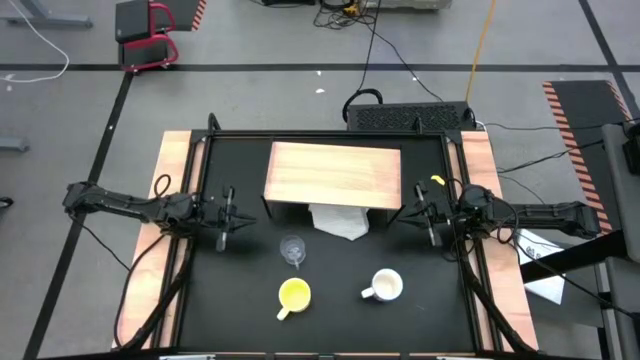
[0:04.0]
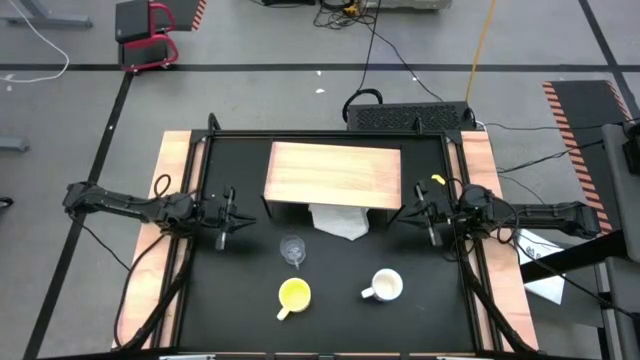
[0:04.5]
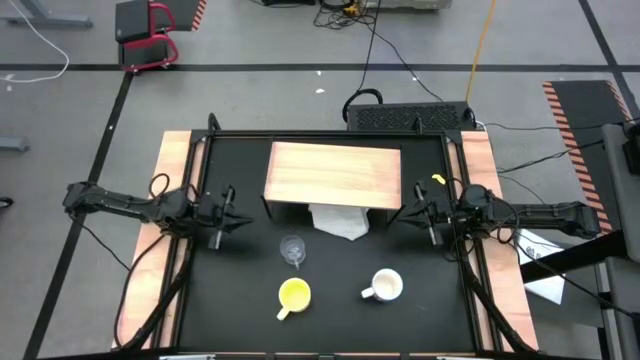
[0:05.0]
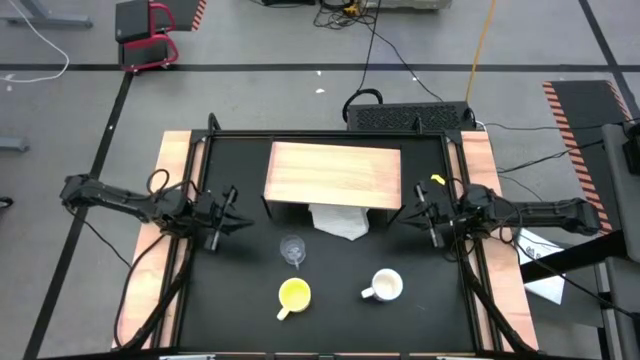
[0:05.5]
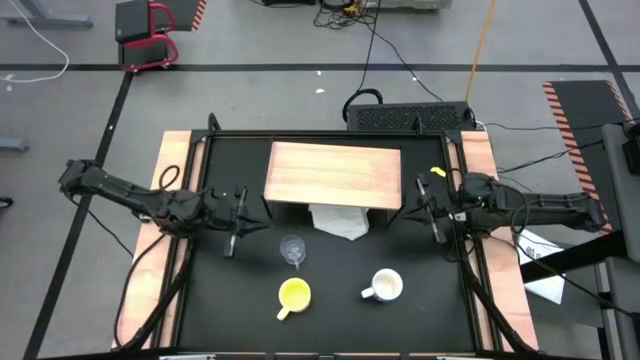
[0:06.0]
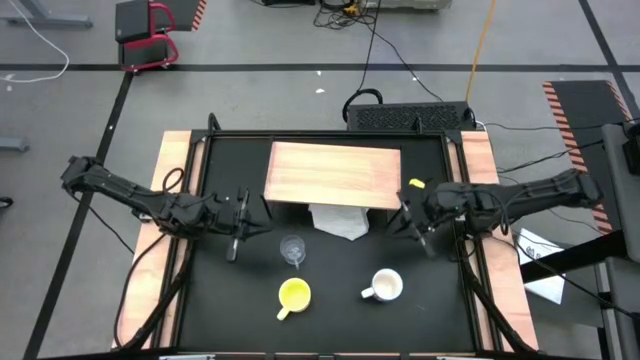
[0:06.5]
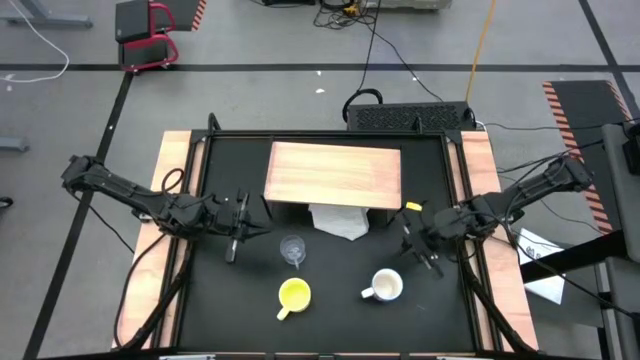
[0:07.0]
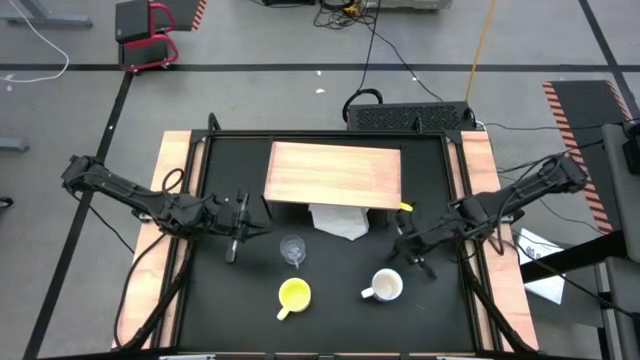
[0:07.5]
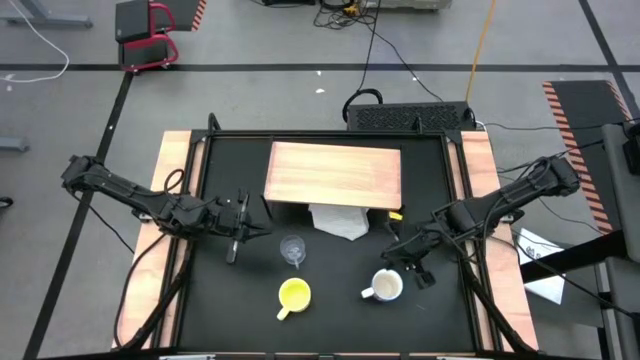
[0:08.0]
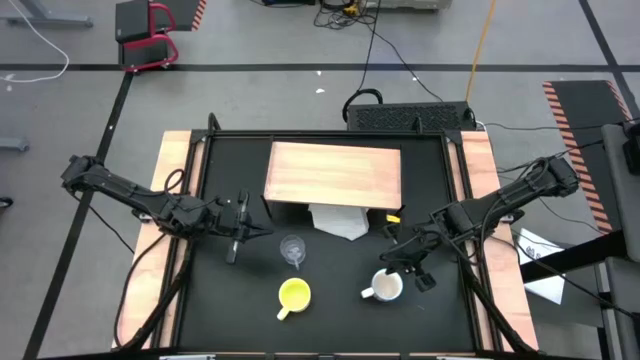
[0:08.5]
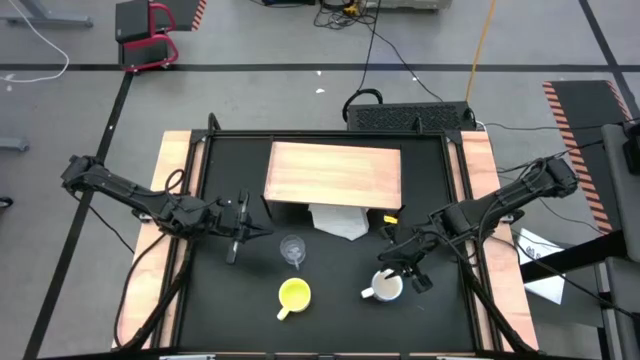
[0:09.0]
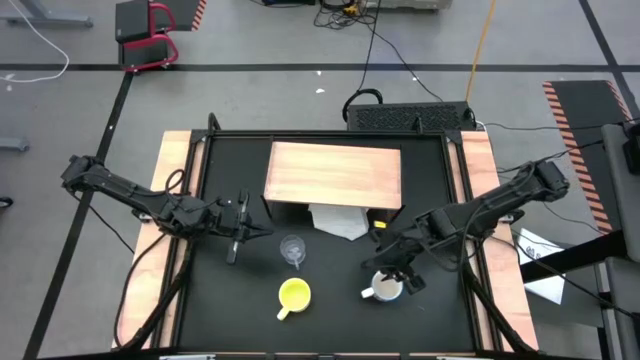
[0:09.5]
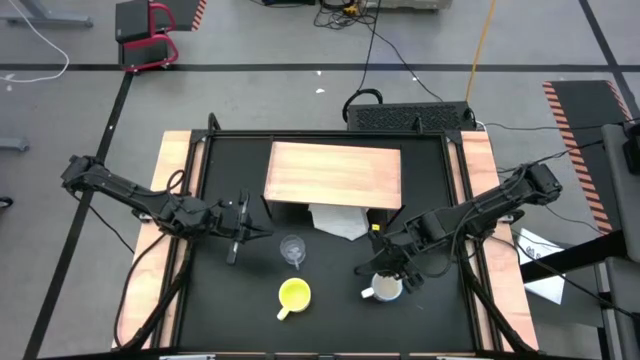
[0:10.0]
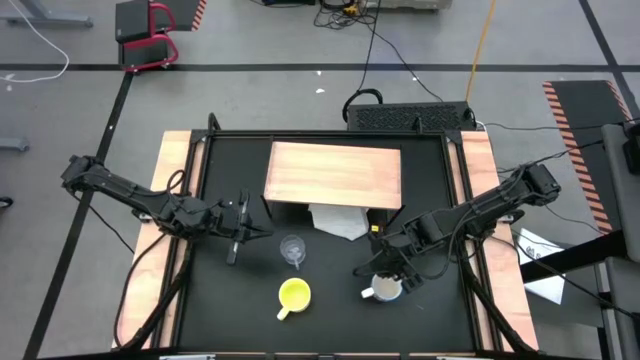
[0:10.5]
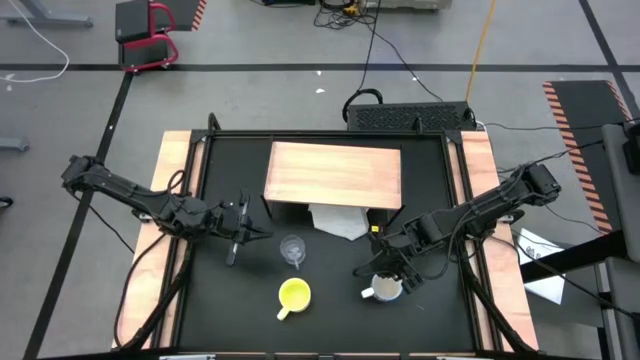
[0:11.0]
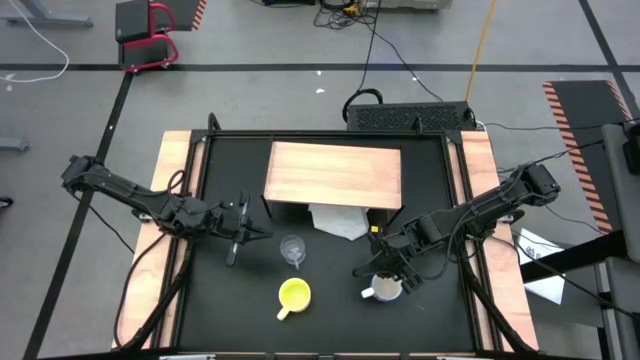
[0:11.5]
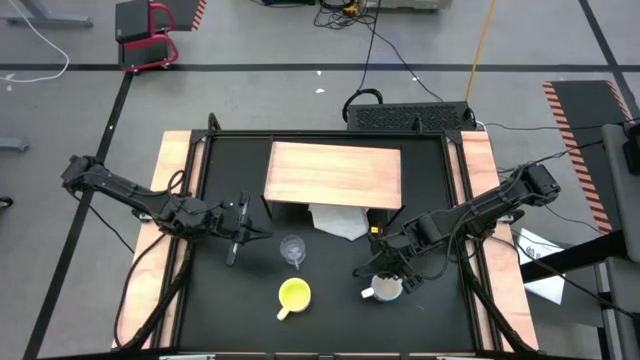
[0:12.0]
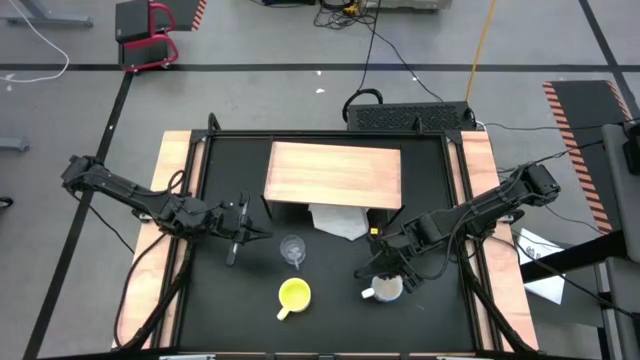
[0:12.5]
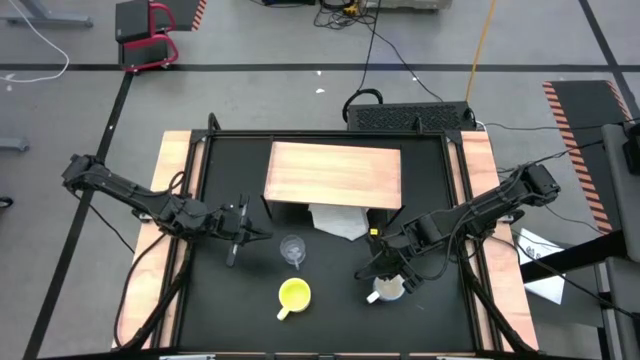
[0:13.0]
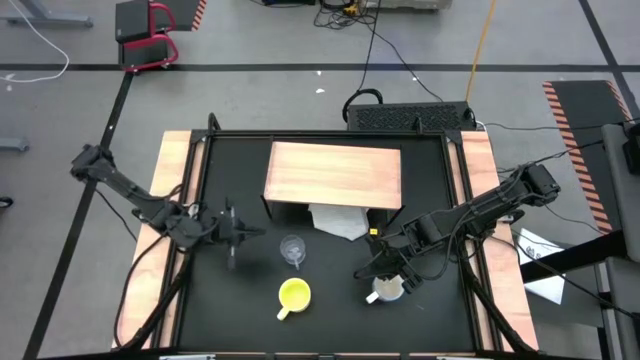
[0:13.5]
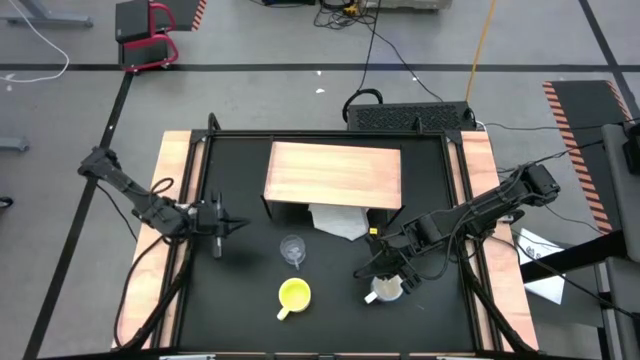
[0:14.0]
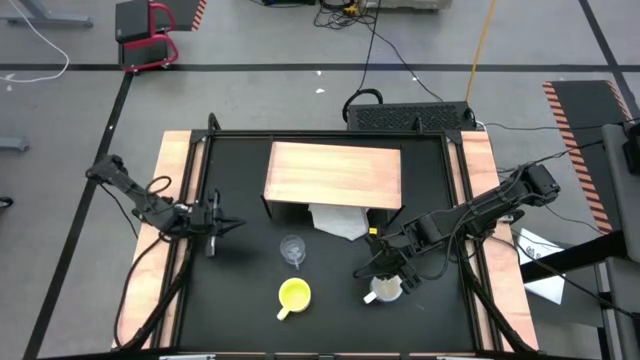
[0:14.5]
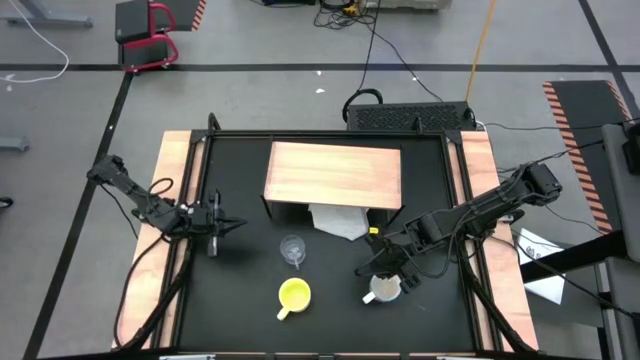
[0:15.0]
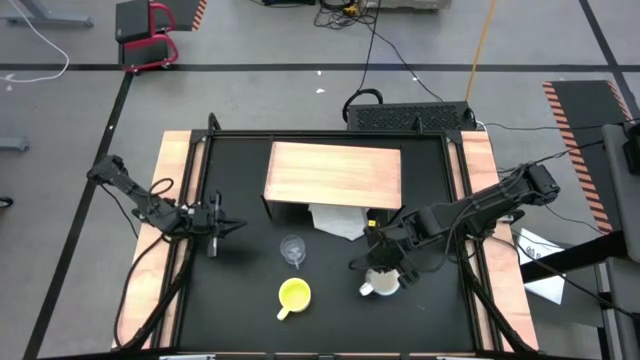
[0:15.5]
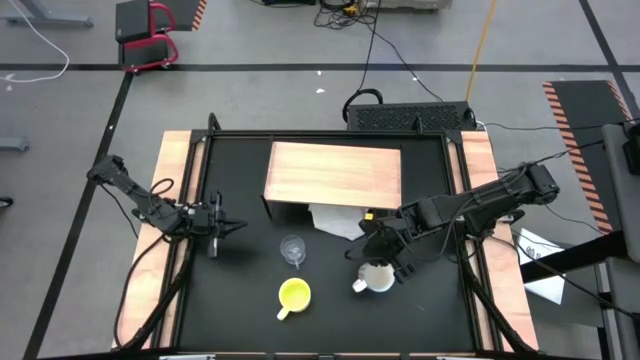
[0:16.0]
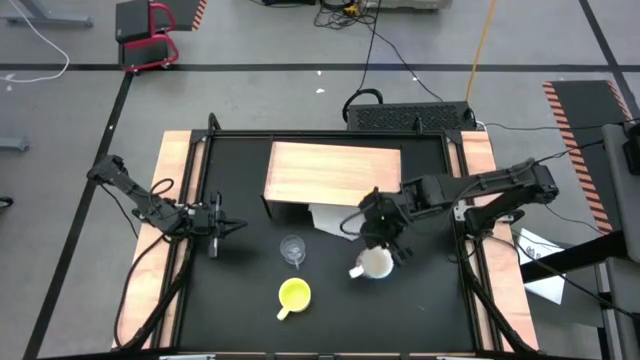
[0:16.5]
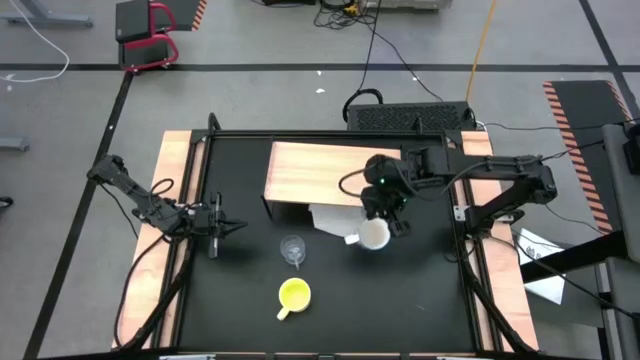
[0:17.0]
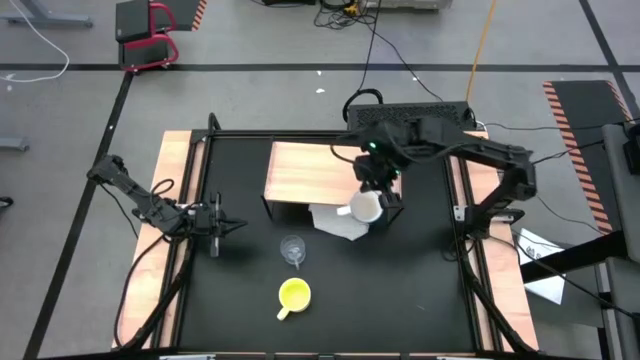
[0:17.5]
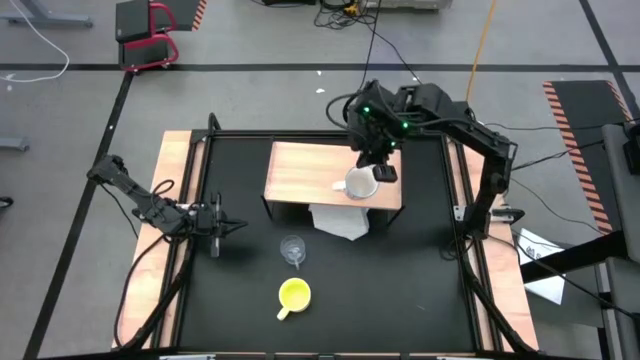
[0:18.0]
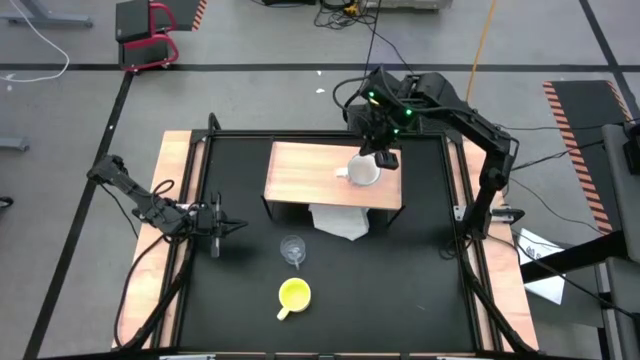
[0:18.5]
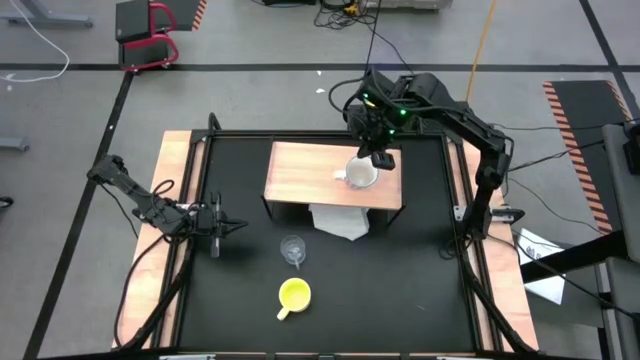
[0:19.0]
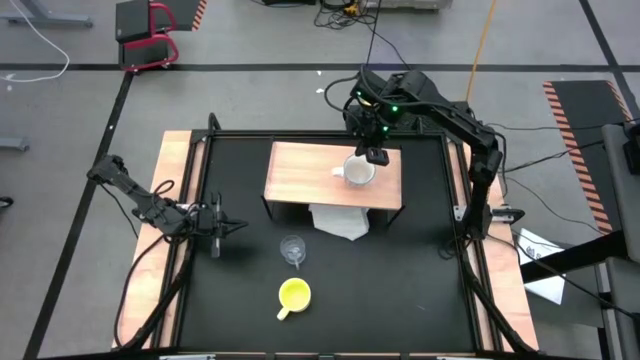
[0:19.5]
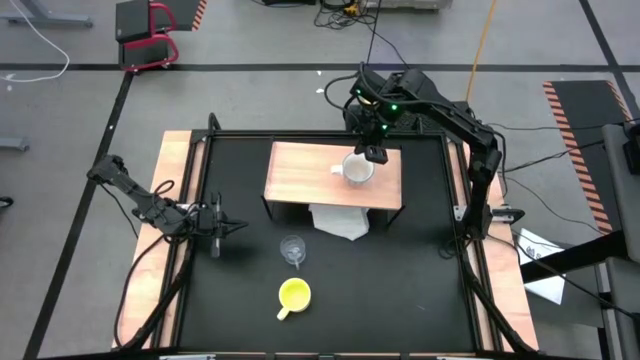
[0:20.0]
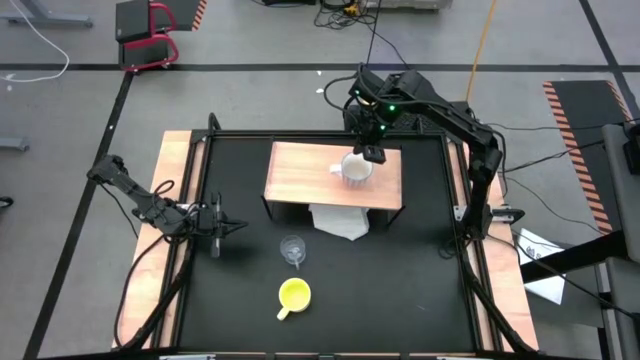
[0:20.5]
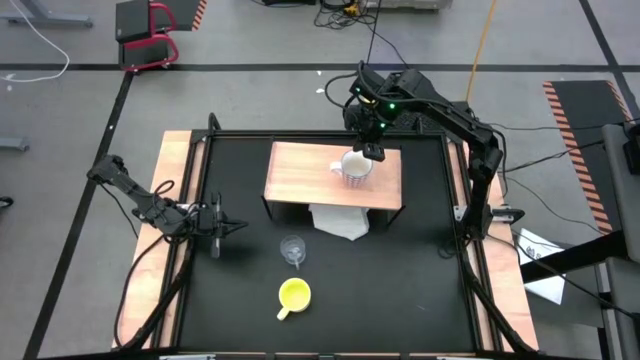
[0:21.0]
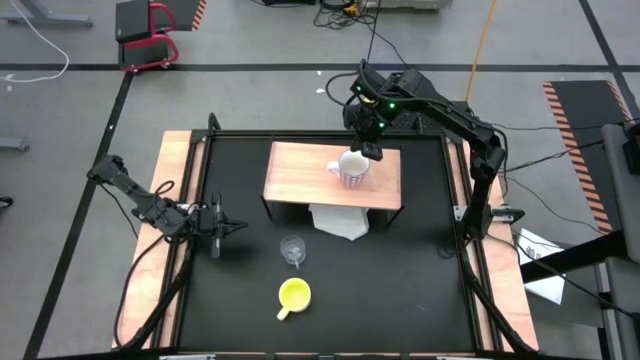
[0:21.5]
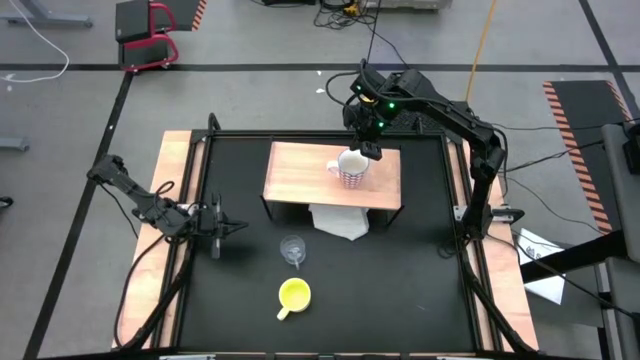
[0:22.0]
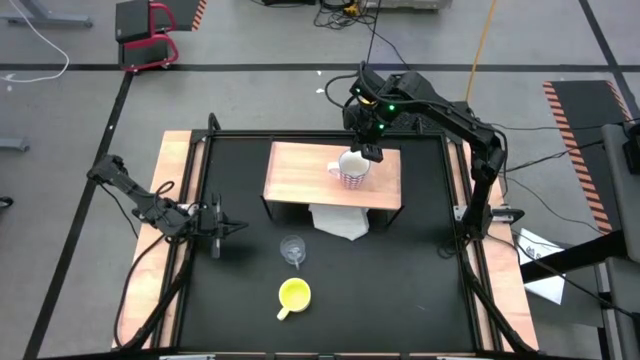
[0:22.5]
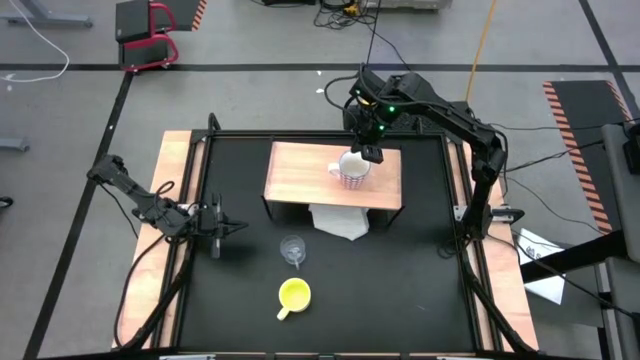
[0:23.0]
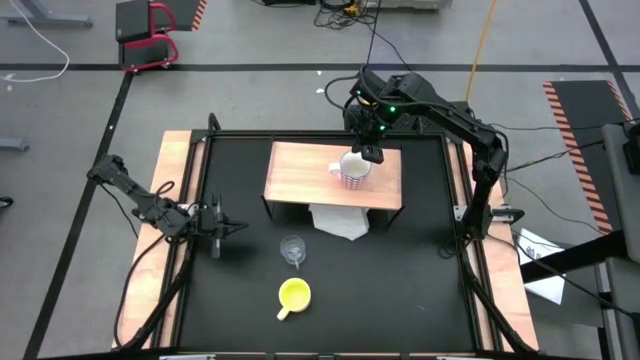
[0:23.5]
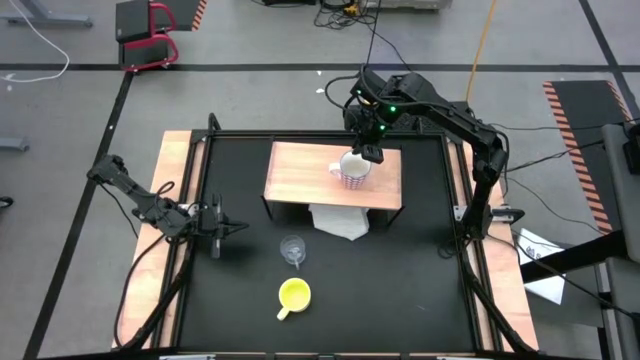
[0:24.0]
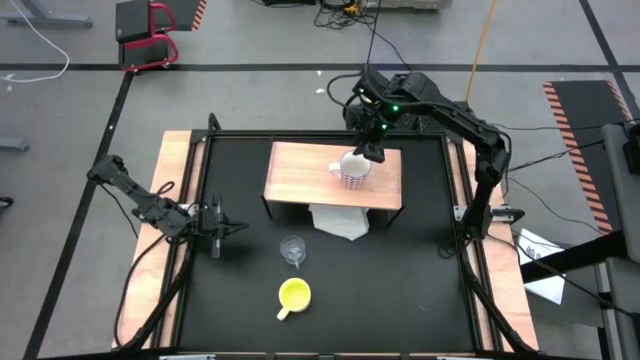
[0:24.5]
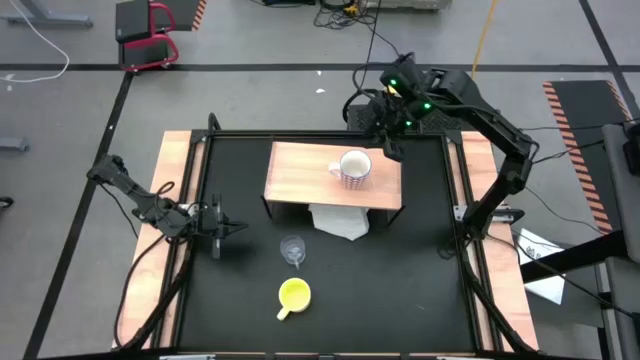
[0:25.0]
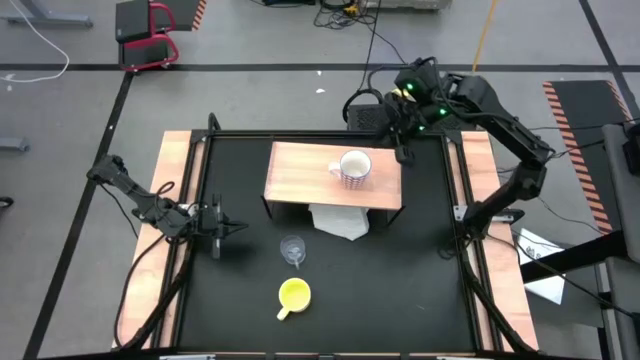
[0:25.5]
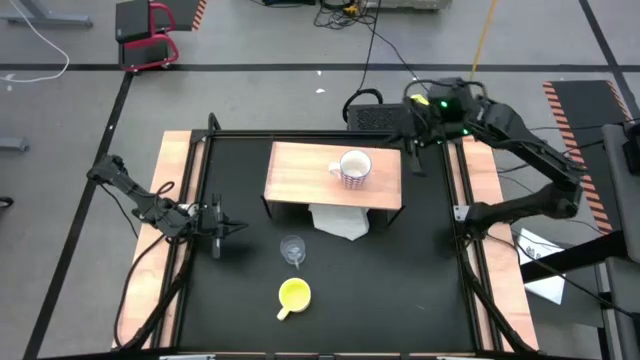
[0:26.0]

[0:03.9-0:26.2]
Task: Stack small to large cups/mugs on shelf
Put the red mug on the shelf
